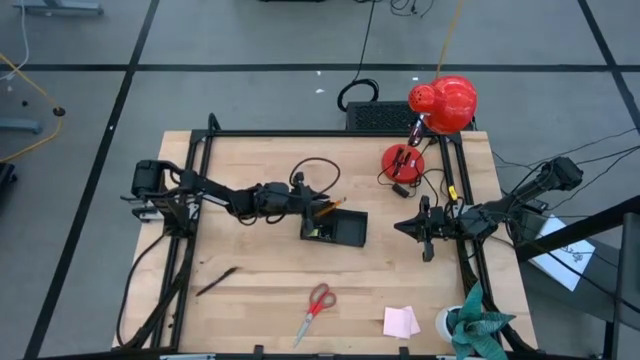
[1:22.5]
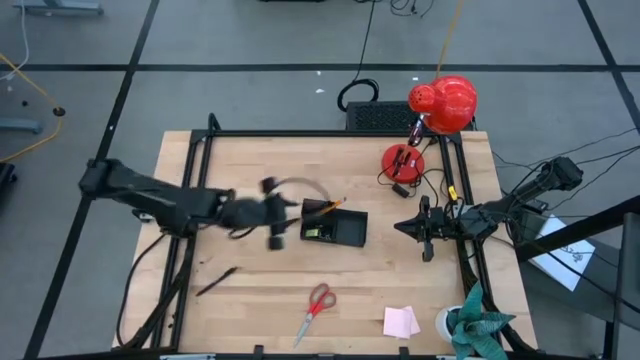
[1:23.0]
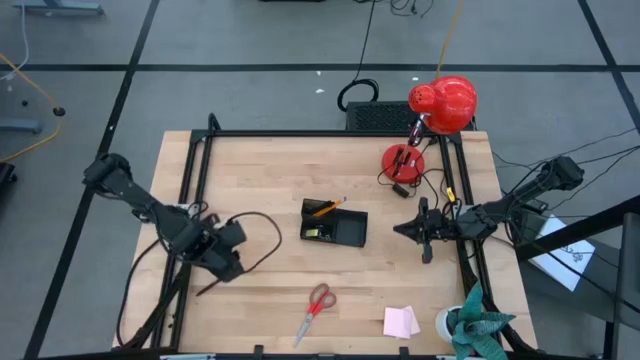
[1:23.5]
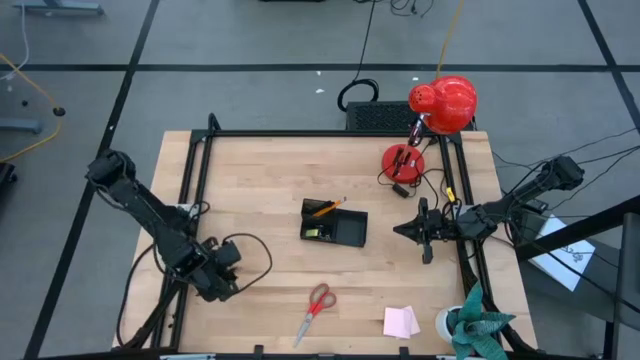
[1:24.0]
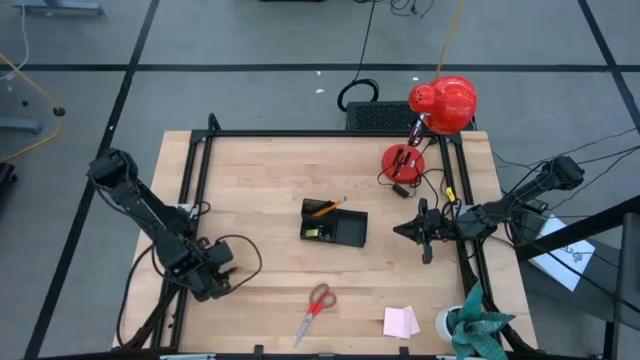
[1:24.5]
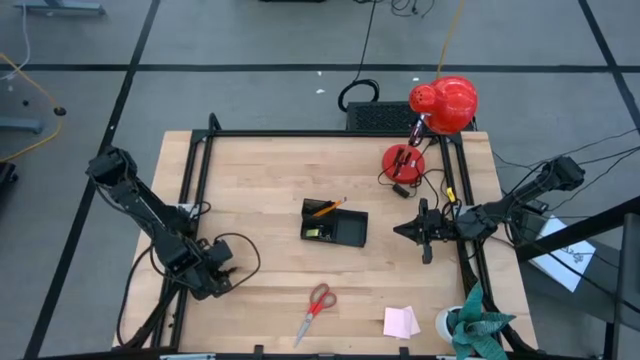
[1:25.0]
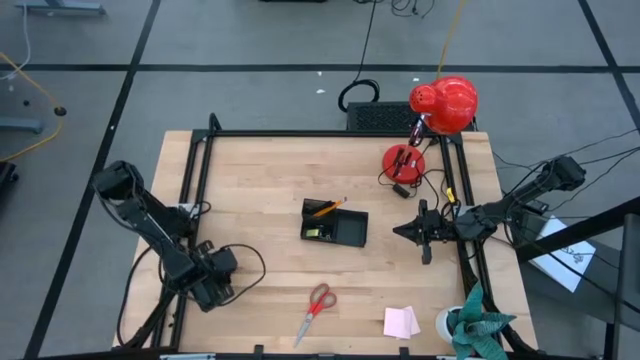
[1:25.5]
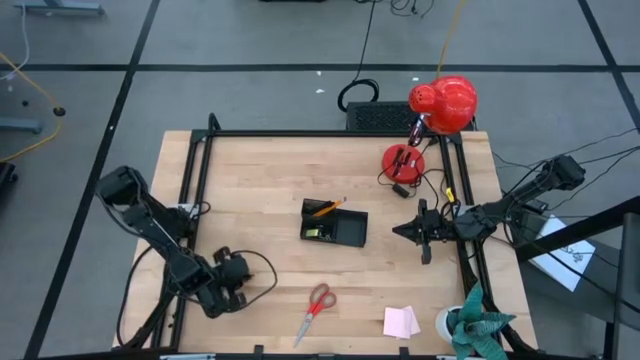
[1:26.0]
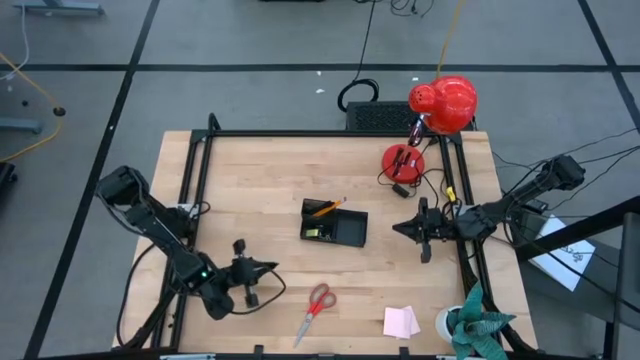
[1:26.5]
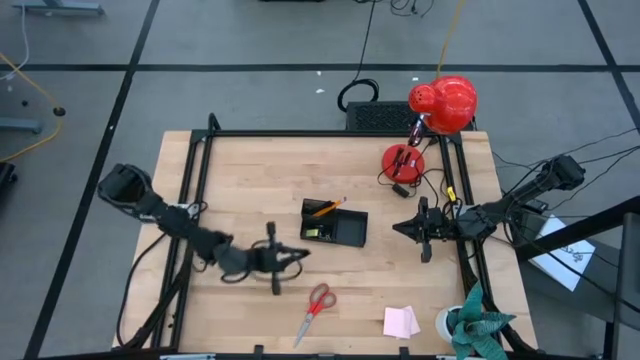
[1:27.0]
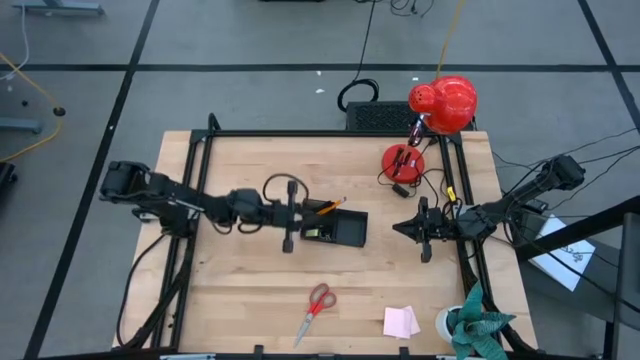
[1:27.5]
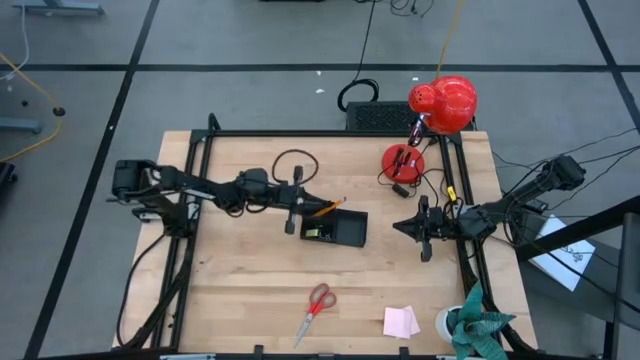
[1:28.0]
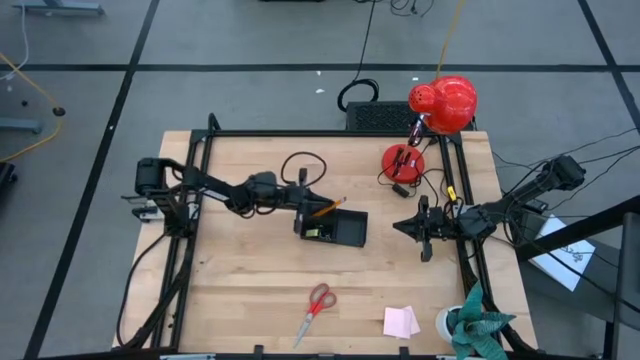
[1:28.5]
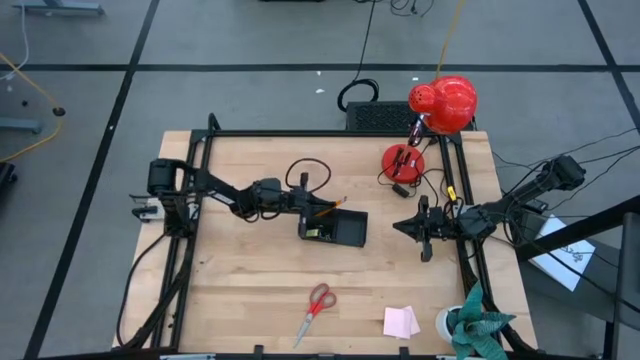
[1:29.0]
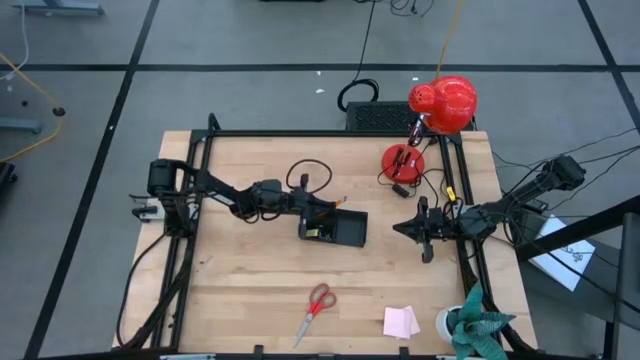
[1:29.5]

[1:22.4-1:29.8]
Task: Pick and place office supplies into organizer
Put the pen into the desk organizer

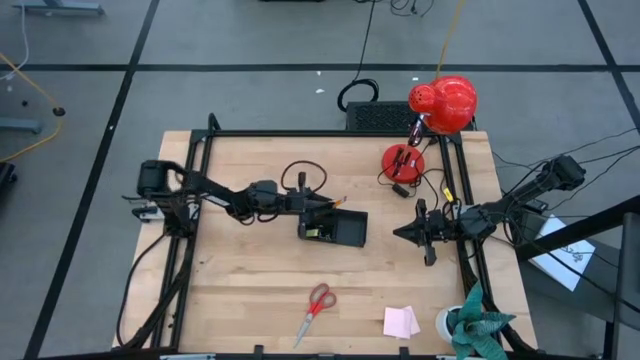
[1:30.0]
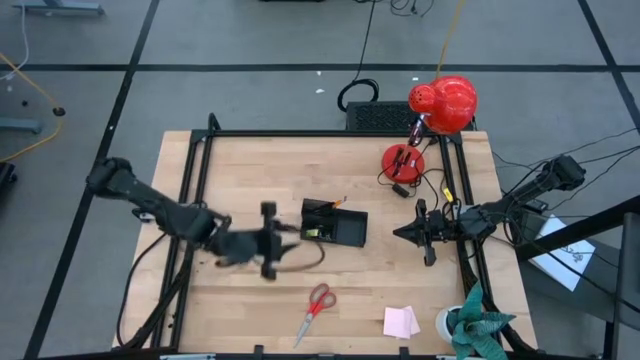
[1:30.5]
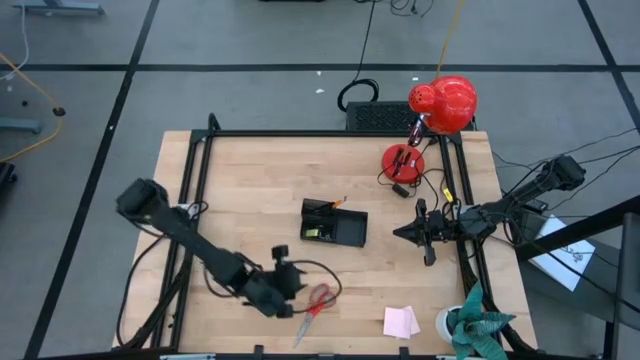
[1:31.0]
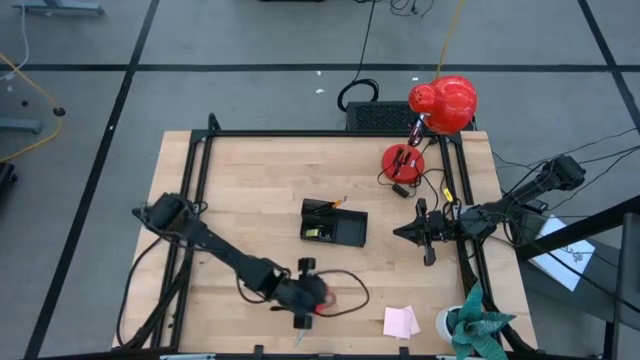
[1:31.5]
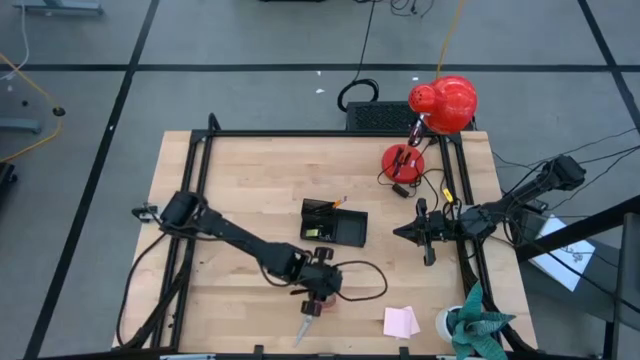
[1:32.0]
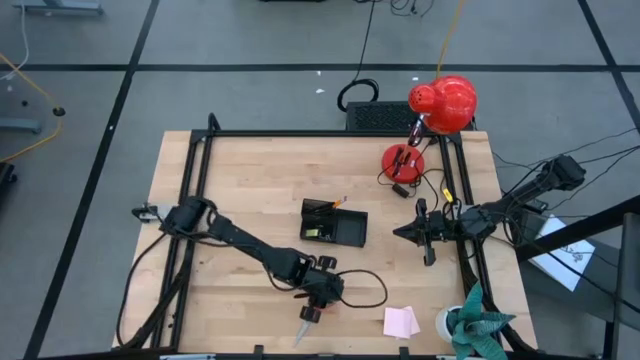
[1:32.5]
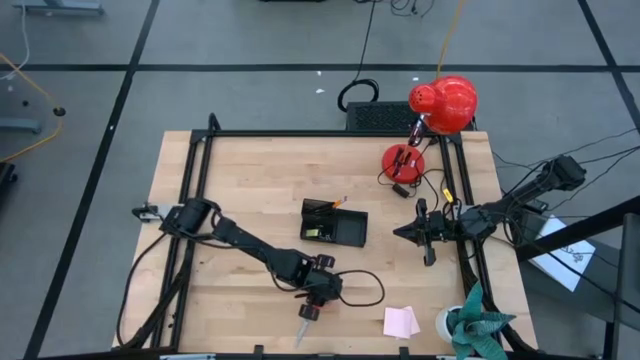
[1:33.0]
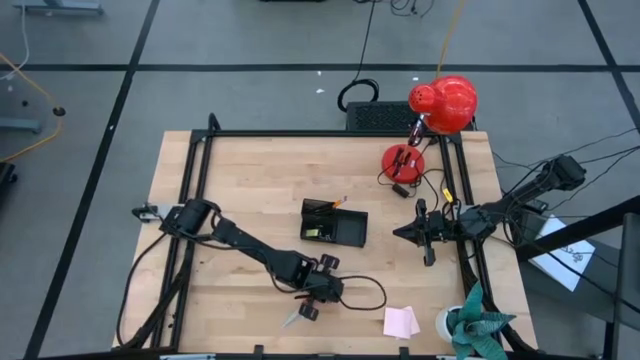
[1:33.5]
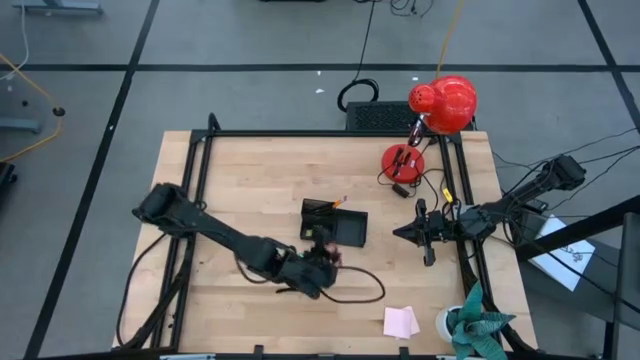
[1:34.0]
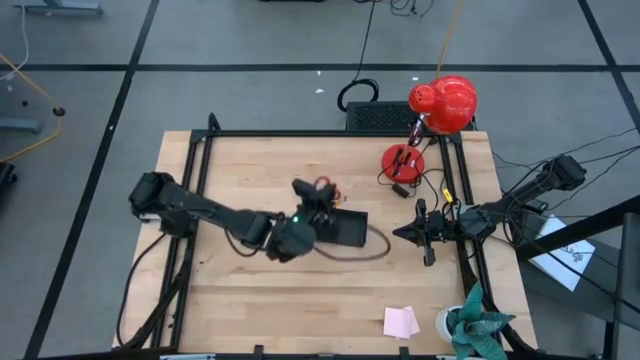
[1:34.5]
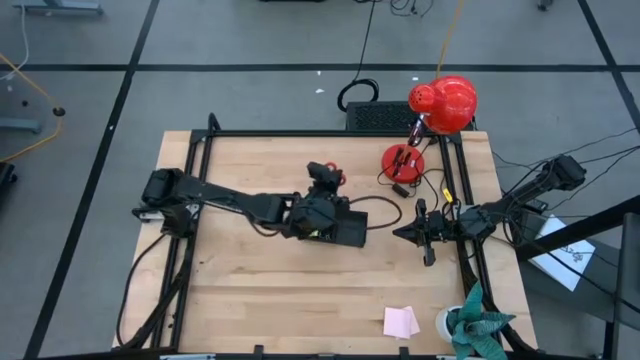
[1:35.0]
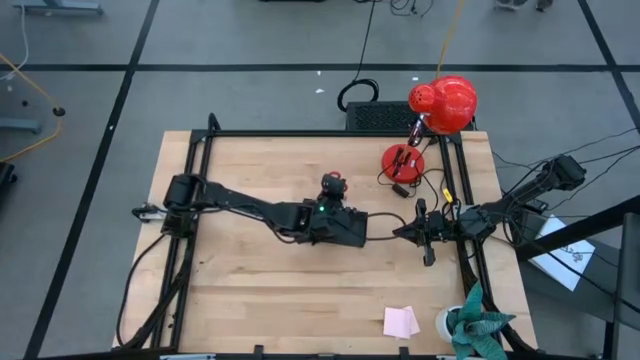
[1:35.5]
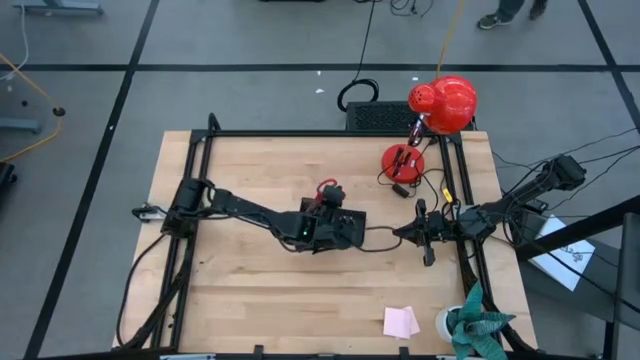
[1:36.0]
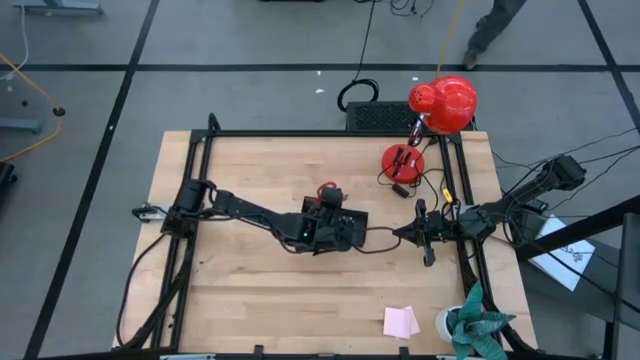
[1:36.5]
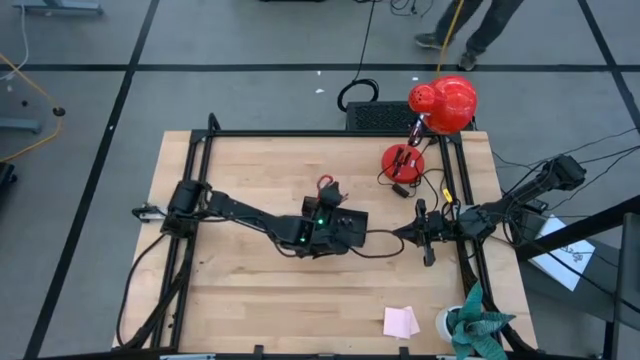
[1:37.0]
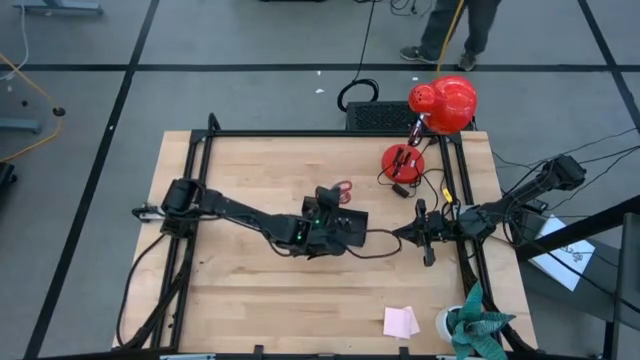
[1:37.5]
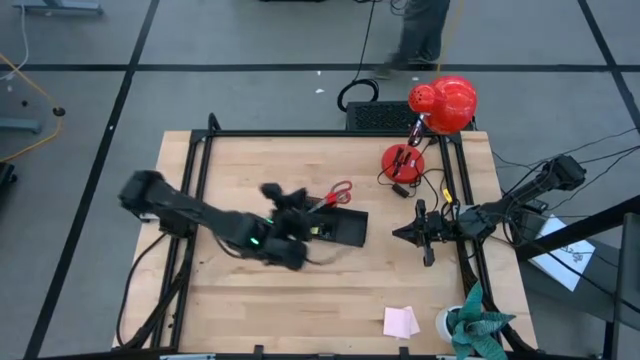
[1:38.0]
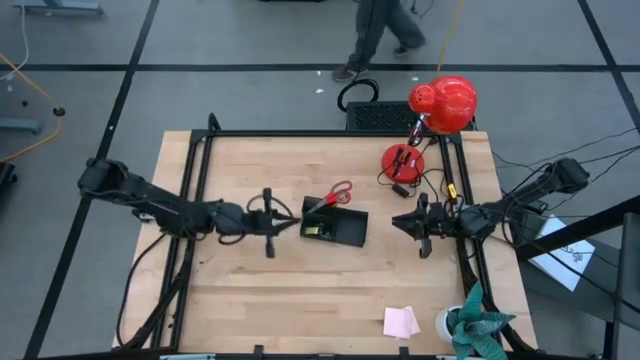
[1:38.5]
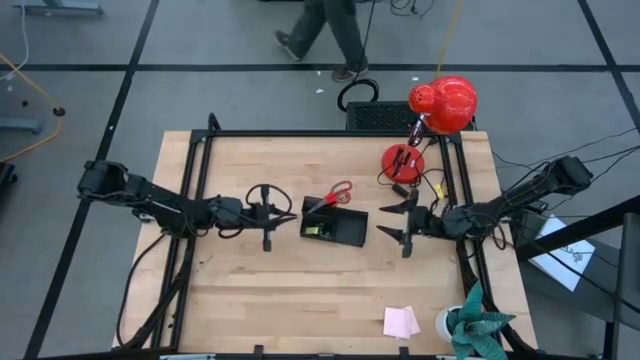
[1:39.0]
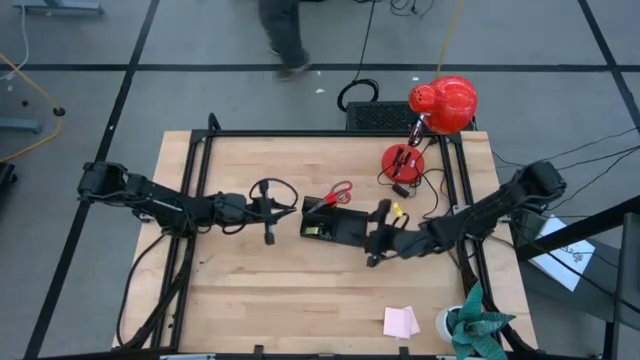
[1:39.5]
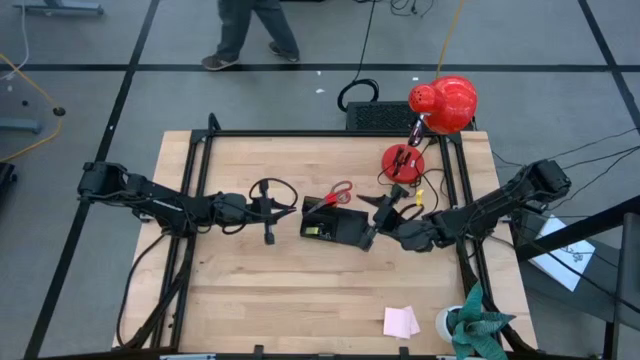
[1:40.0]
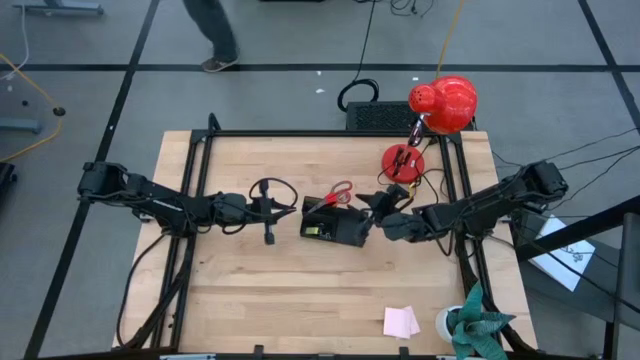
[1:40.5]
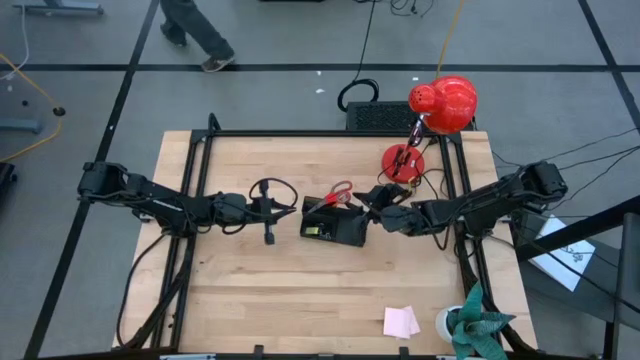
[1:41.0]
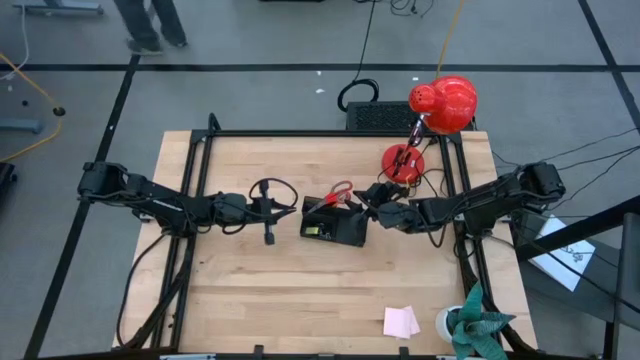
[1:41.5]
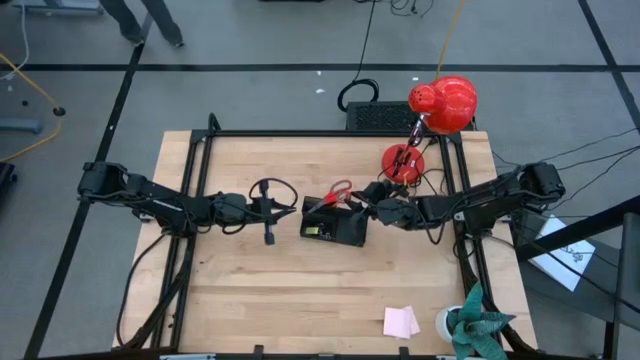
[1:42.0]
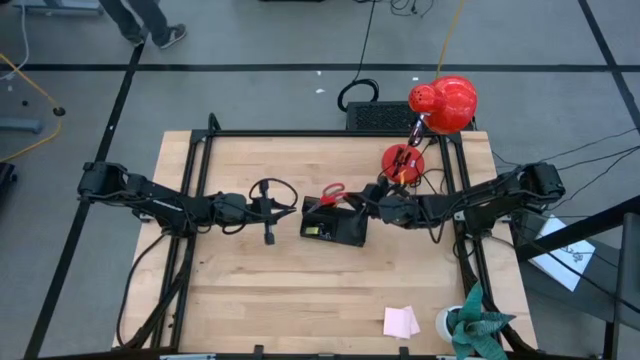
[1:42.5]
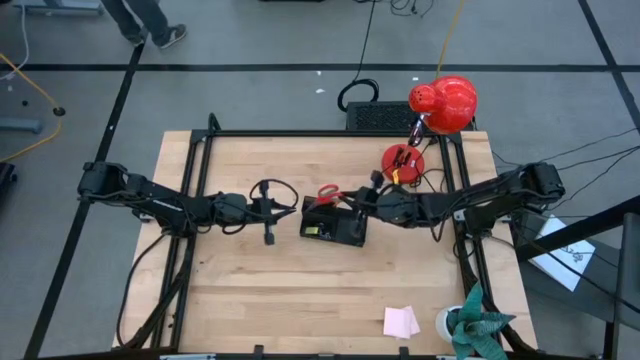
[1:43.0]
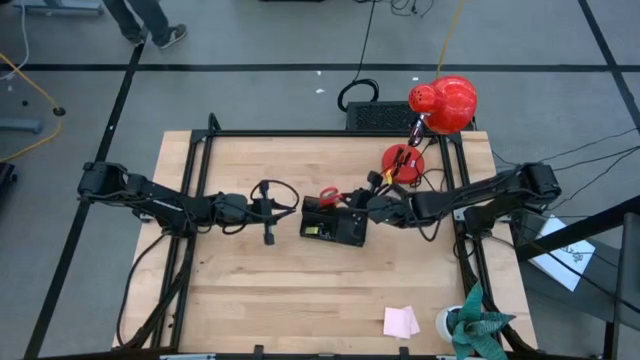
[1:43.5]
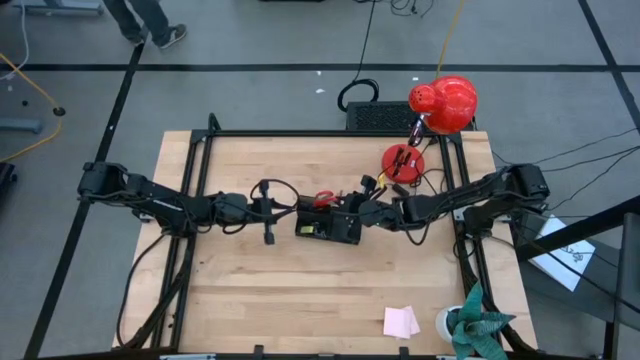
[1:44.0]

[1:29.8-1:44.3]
Put the scissors into the desk organizer

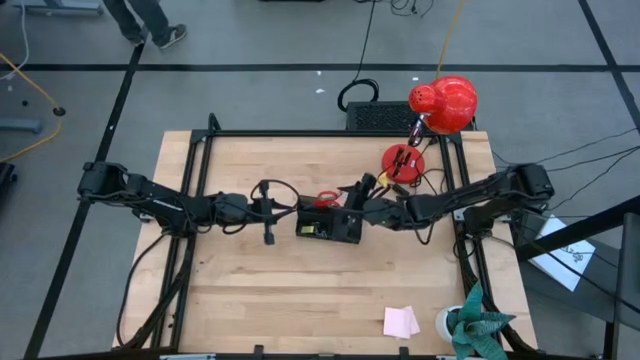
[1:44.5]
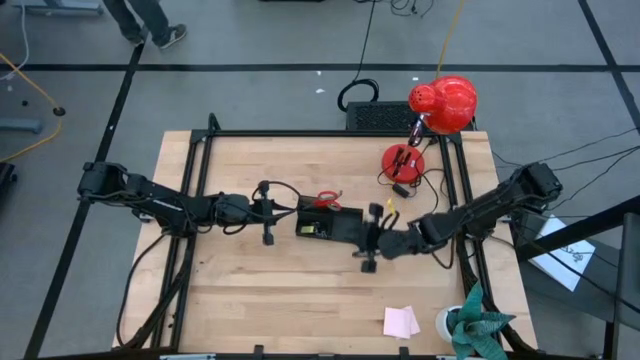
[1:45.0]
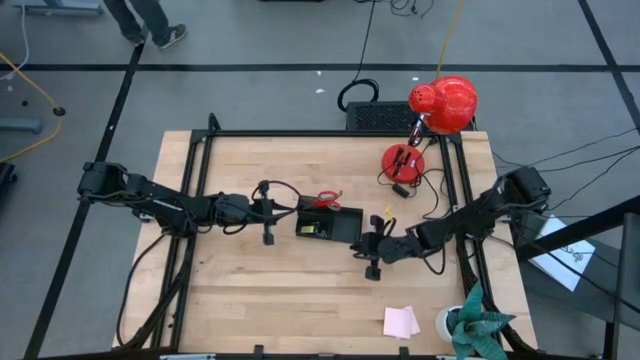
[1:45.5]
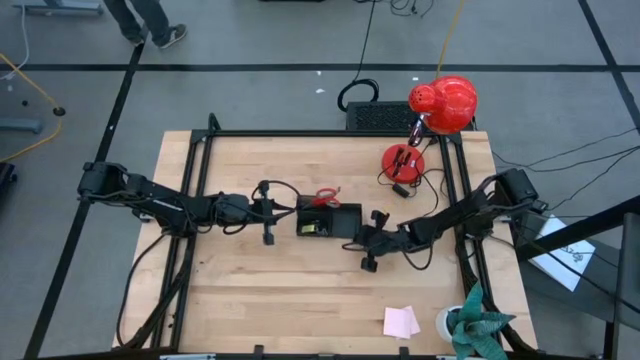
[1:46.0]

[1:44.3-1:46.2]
Adjust the desk organizer
